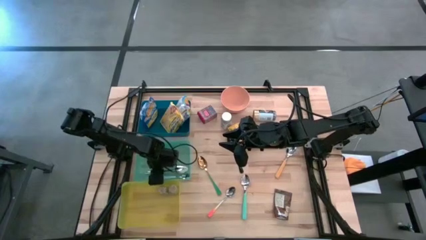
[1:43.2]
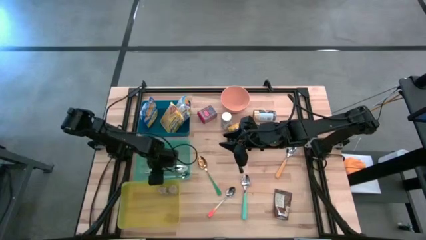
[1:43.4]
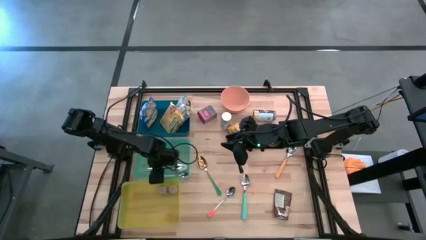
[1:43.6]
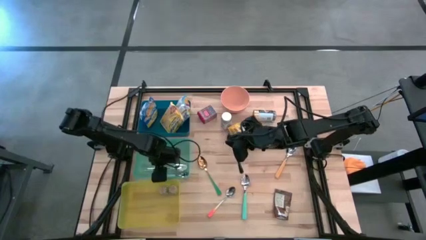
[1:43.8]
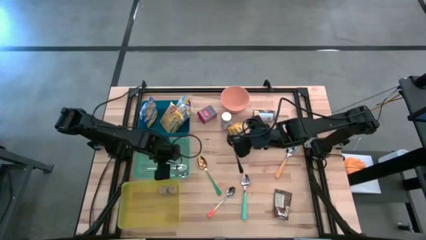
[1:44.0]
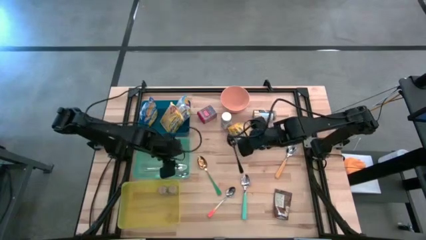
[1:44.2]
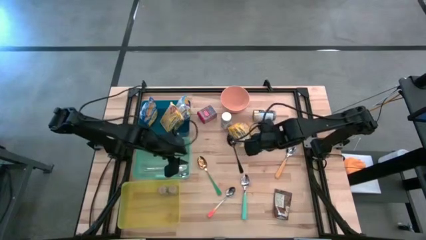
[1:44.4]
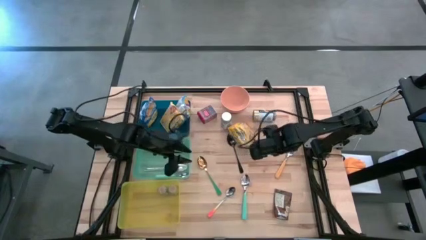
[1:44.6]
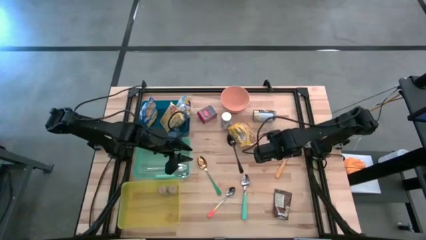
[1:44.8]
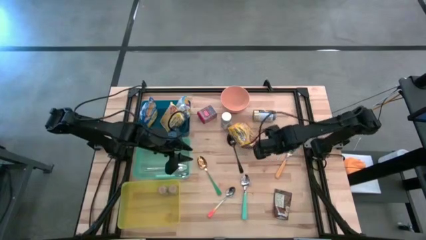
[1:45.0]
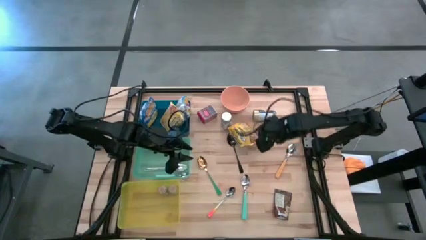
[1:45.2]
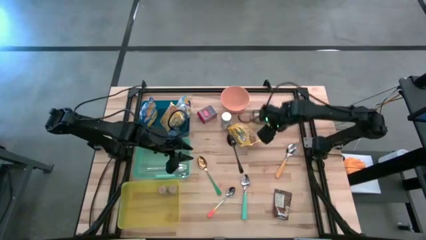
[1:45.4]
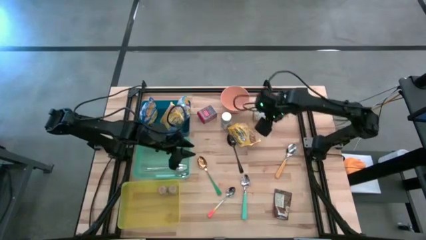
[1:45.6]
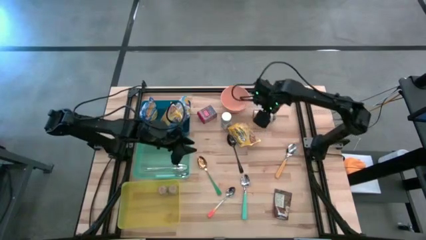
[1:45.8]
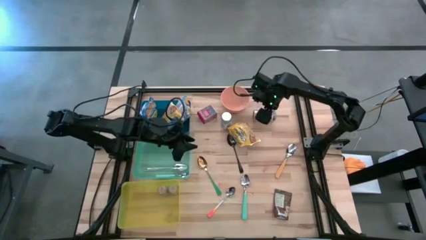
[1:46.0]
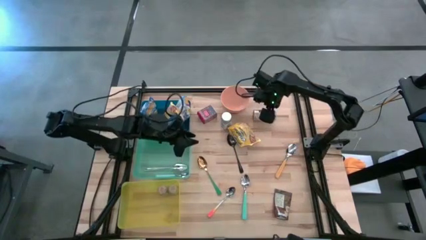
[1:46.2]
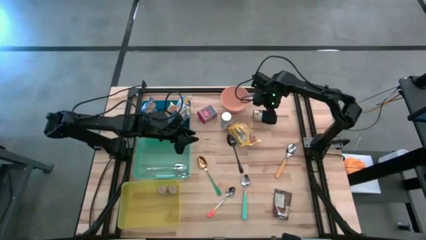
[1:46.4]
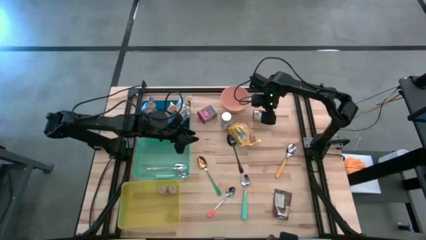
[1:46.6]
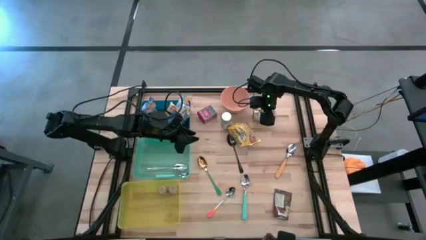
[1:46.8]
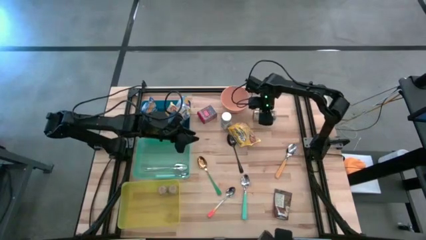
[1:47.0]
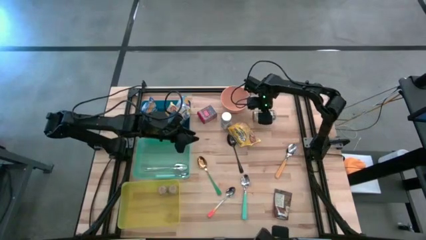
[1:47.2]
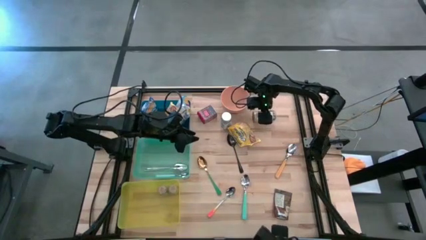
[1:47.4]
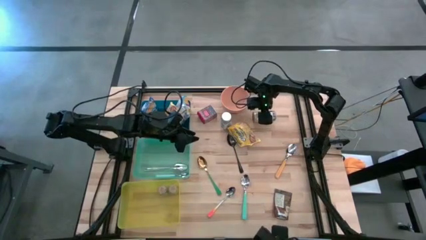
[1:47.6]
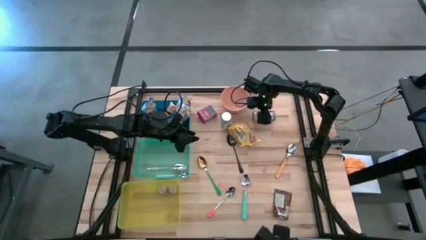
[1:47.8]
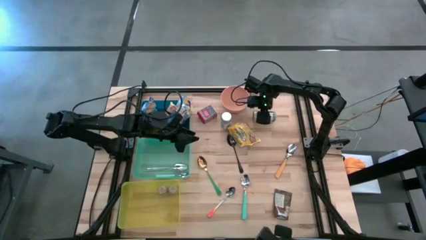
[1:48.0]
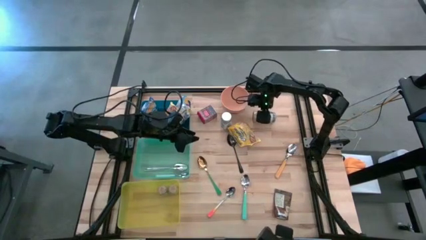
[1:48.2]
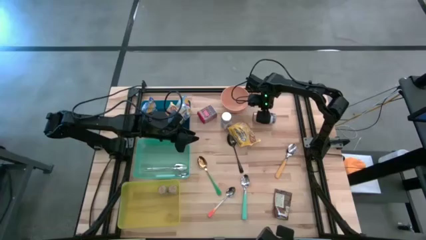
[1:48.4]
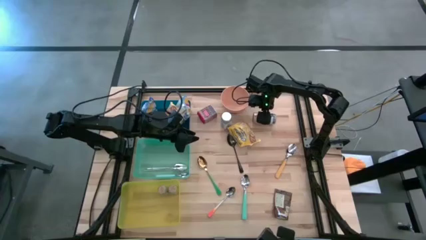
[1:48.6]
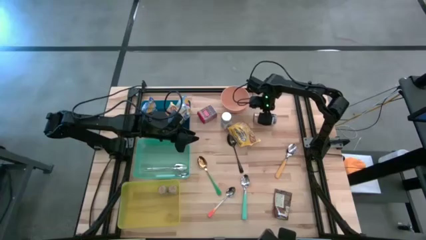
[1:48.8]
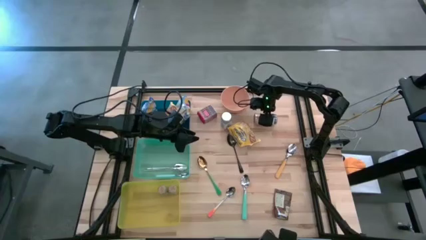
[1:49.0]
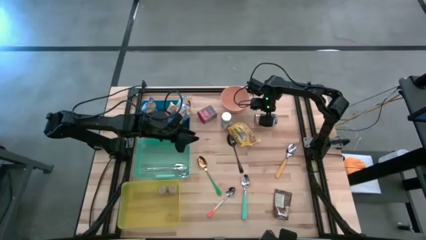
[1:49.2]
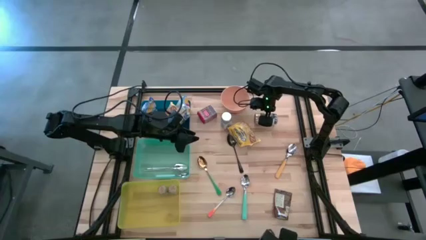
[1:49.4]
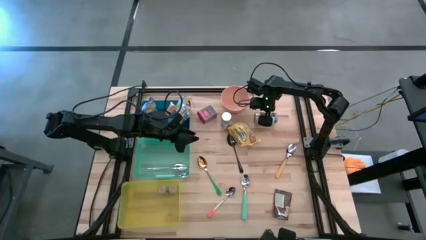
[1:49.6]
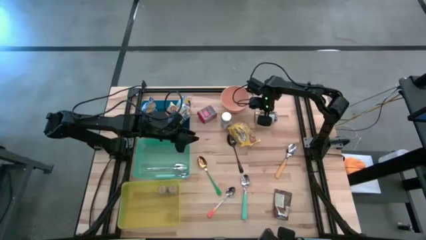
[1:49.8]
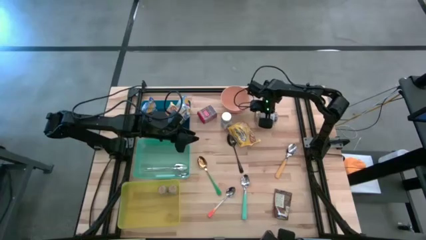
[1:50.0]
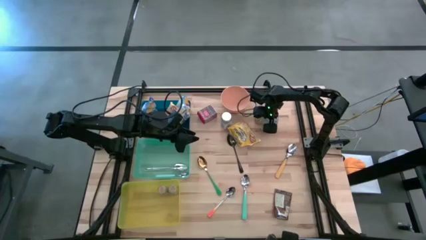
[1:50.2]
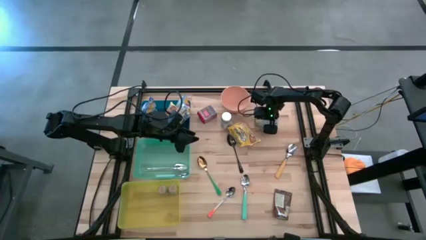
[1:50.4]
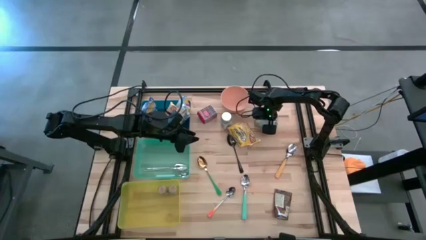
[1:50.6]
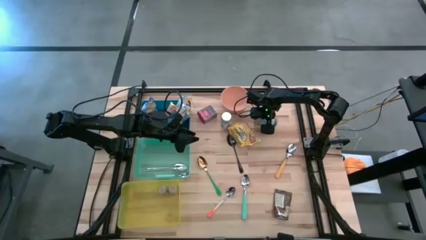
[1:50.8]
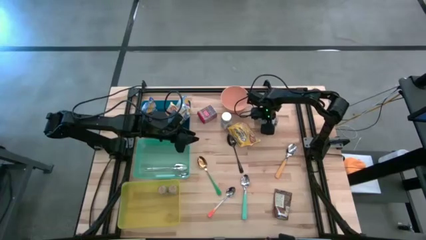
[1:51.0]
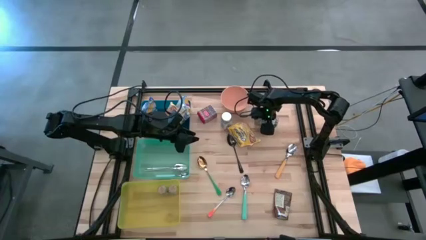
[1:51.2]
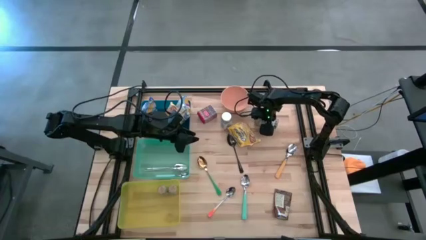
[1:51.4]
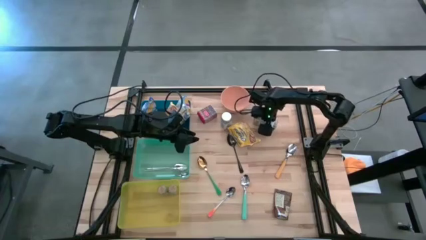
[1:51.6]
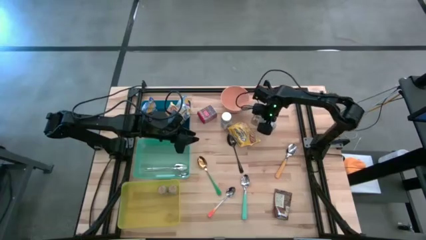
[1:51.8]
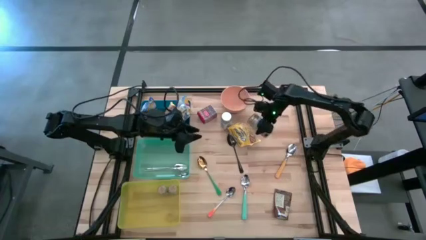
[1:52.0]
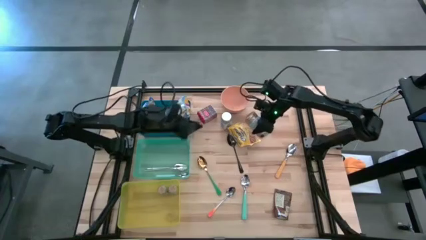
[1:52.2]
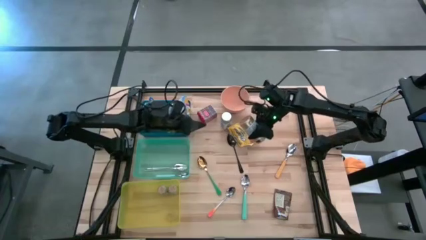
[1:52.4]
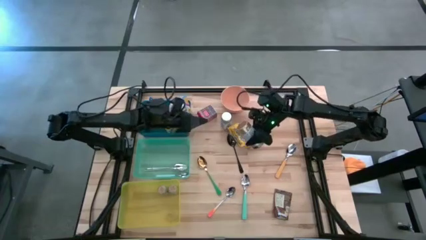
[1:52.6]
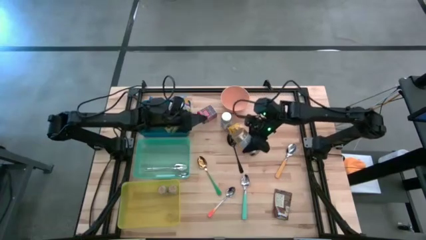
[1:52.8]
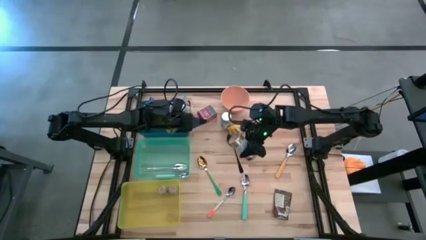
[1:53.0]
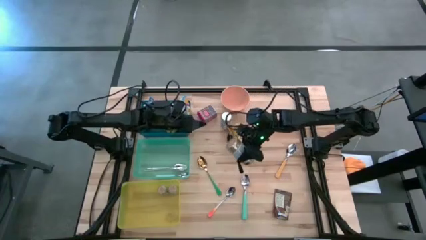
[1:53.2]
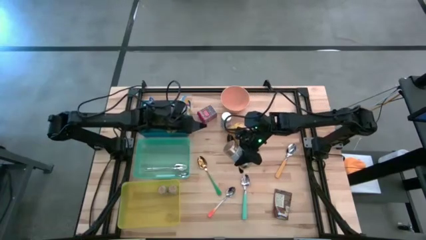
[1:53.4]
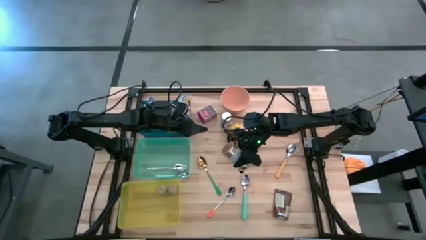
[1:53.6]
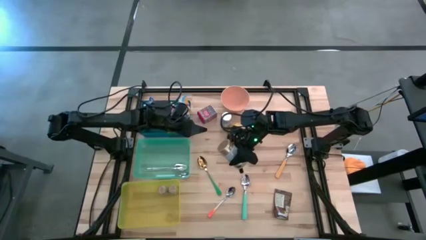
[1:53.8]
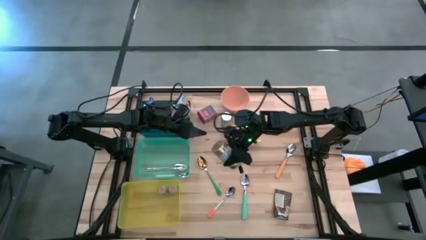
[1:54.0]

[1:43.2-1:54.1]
Put the golden seasoning bottle into the yellow bin
